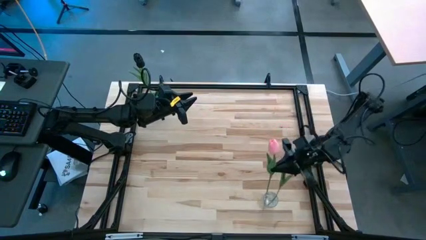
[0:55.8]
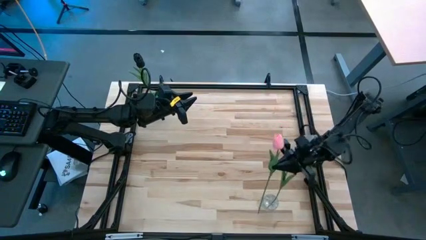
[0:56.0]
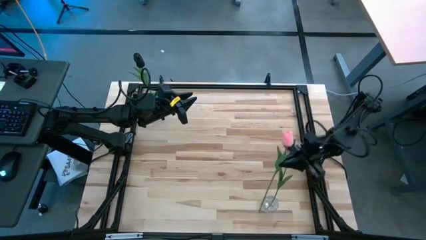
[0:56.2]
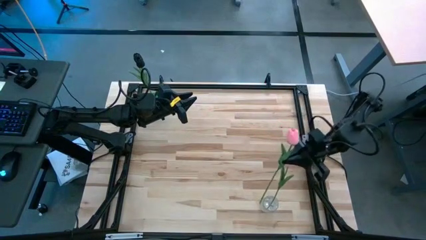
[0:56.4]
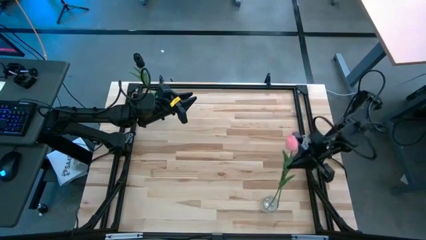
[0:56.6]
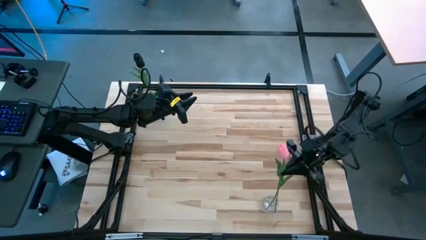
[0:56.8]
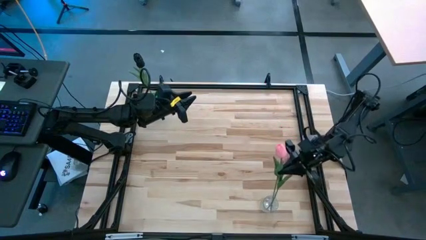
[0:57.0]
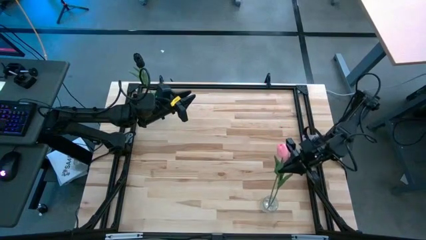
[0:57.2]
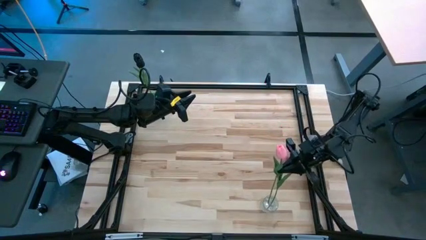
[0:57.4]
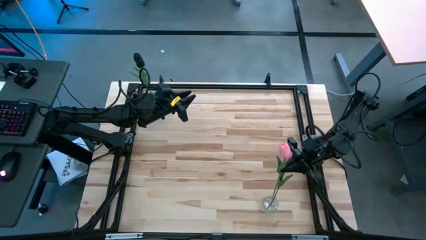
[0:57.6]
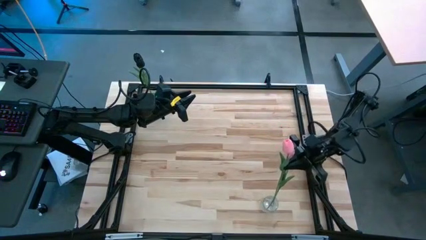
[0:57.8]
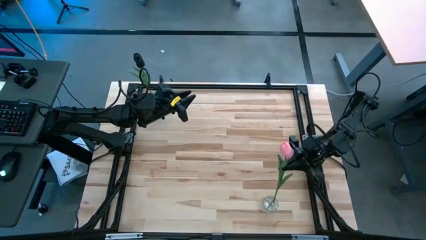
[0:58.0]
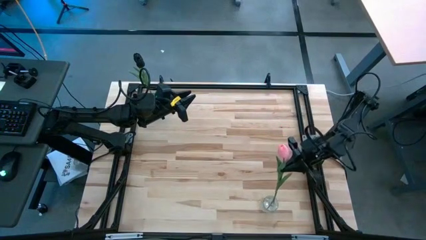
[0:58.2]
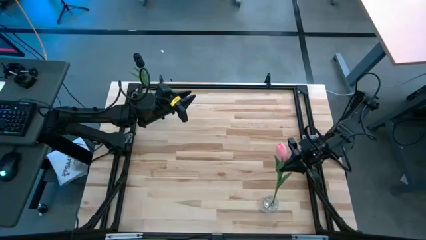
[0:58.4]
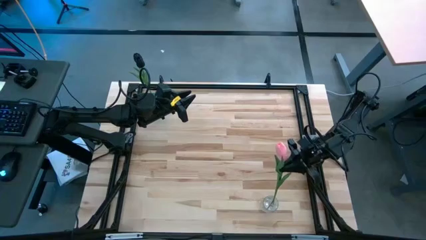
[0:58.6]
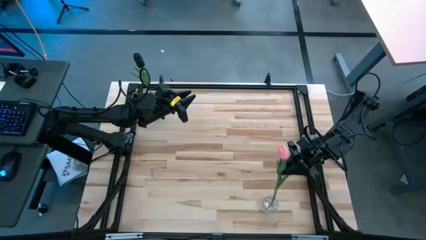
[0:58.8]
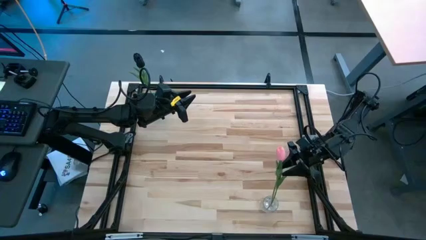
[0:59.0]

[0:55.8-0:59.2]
Task: Sort flowers into vase by color
Put the pink flower into the transparent vase

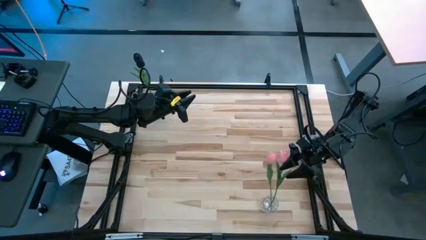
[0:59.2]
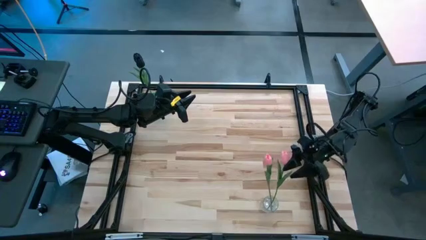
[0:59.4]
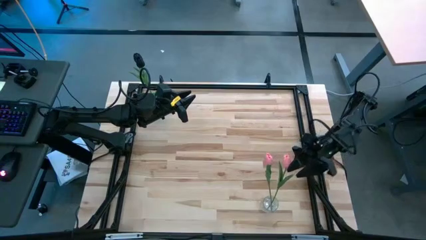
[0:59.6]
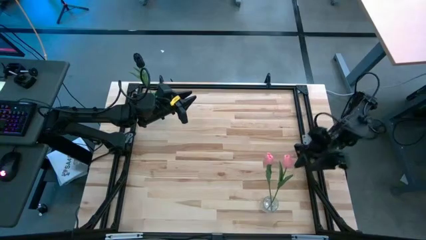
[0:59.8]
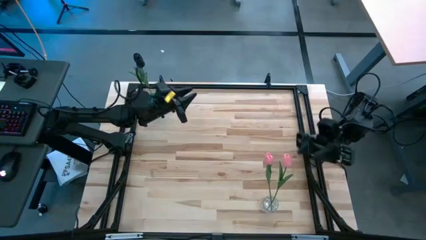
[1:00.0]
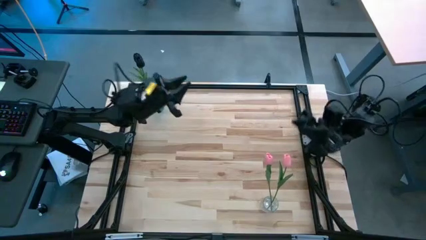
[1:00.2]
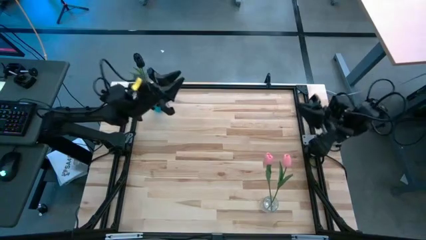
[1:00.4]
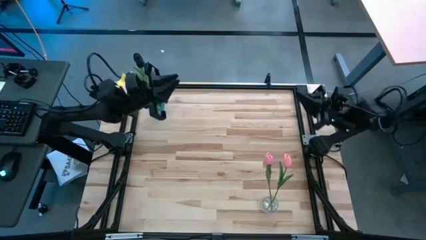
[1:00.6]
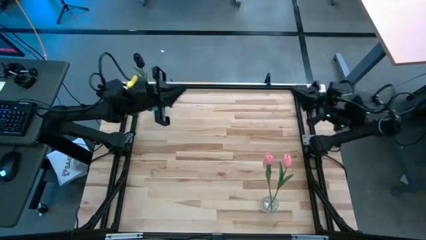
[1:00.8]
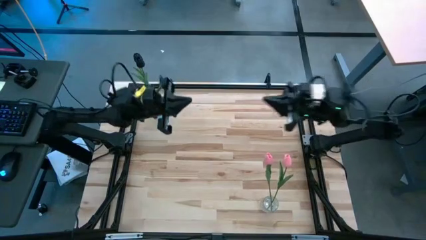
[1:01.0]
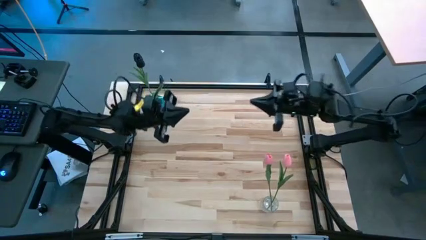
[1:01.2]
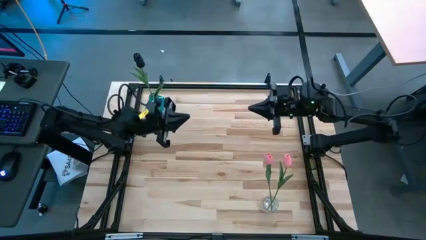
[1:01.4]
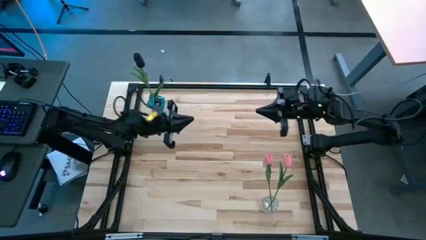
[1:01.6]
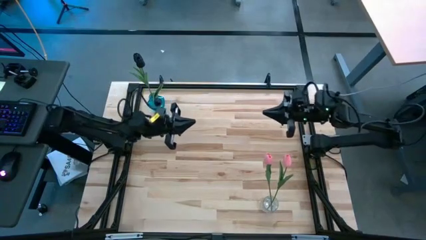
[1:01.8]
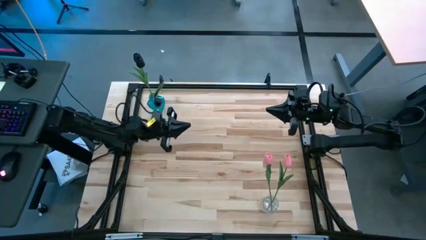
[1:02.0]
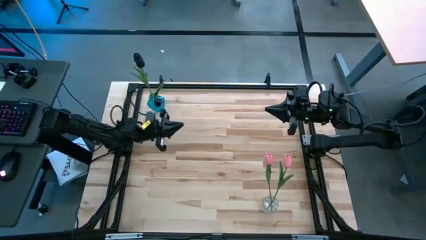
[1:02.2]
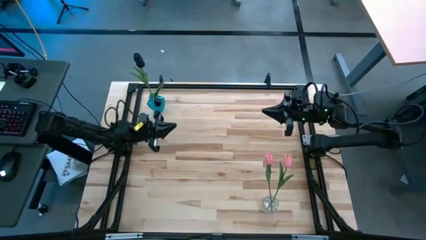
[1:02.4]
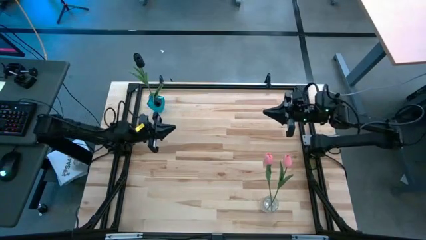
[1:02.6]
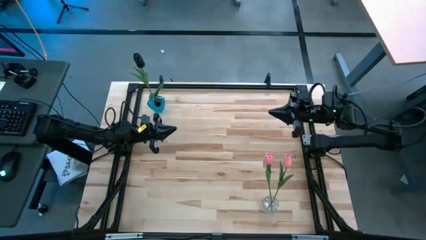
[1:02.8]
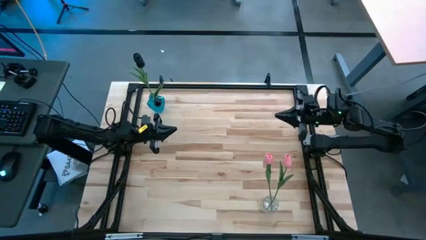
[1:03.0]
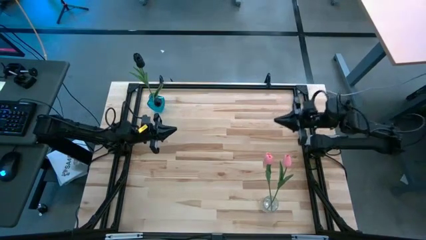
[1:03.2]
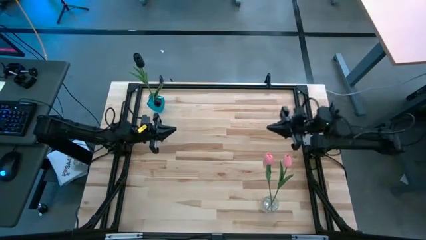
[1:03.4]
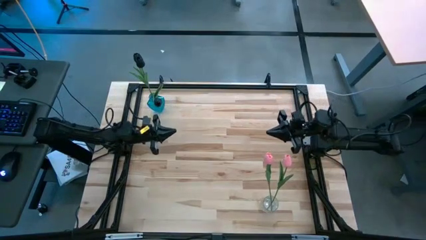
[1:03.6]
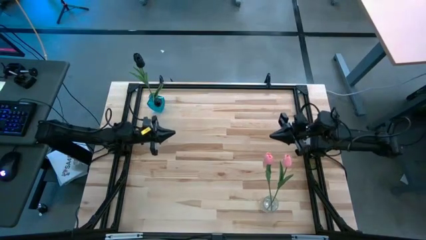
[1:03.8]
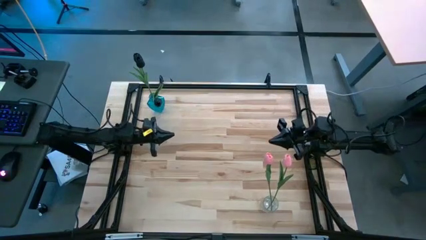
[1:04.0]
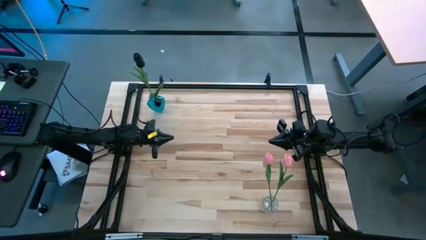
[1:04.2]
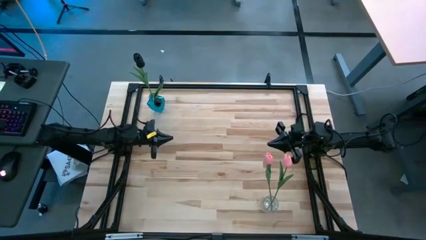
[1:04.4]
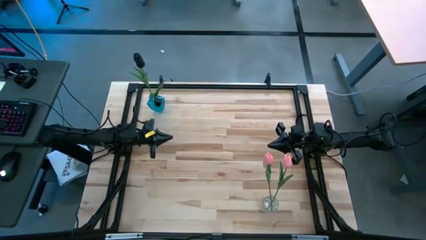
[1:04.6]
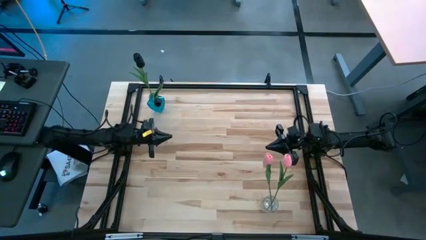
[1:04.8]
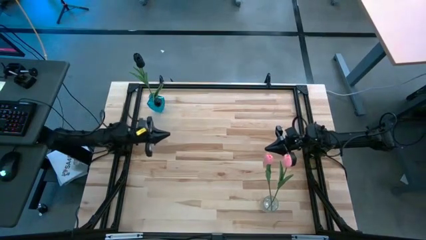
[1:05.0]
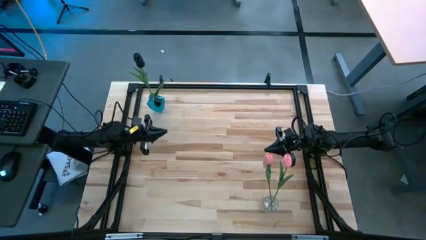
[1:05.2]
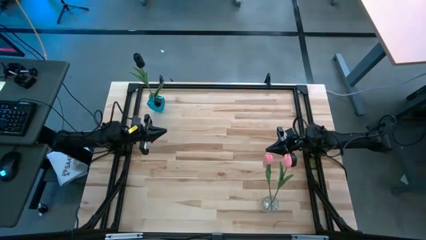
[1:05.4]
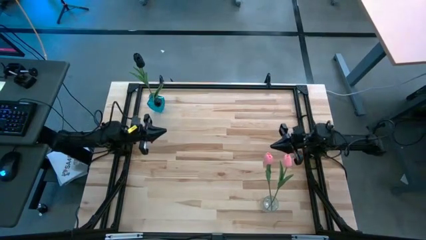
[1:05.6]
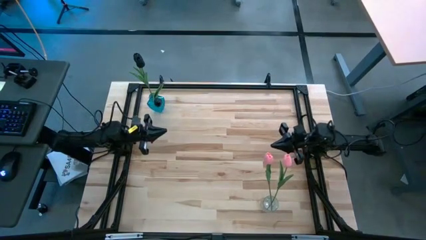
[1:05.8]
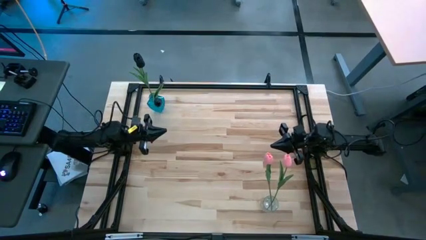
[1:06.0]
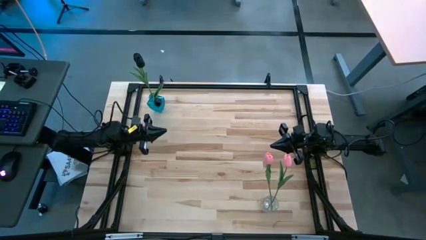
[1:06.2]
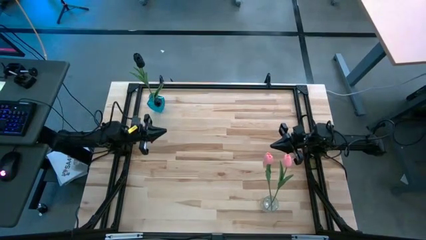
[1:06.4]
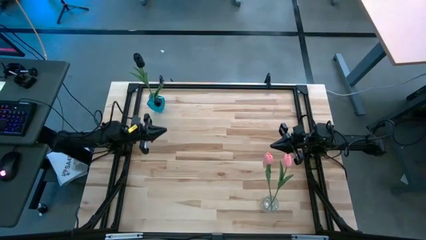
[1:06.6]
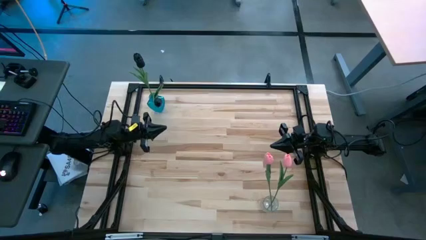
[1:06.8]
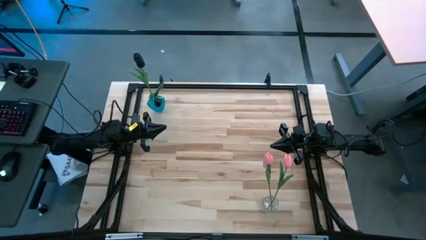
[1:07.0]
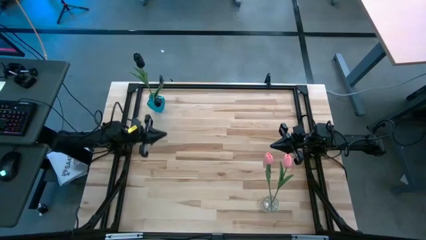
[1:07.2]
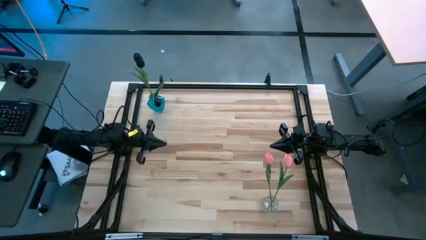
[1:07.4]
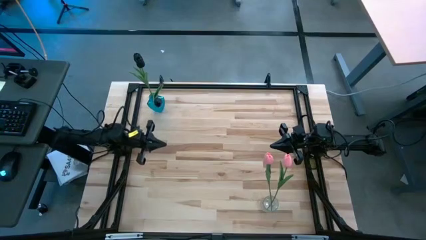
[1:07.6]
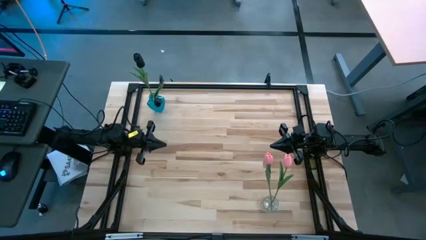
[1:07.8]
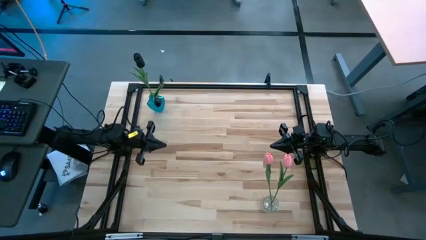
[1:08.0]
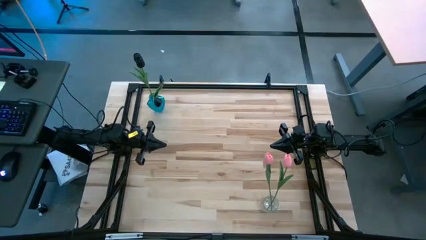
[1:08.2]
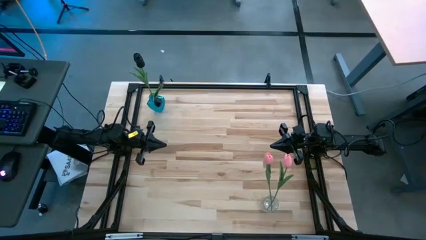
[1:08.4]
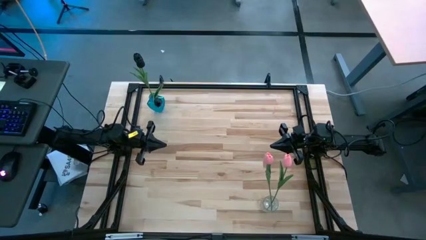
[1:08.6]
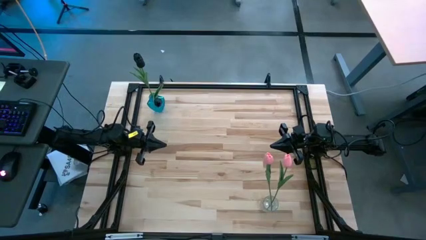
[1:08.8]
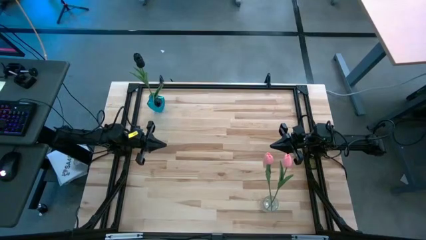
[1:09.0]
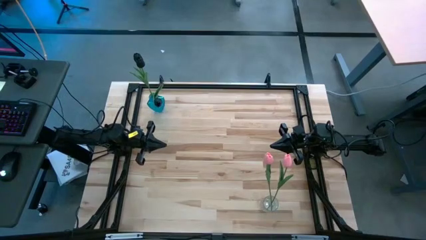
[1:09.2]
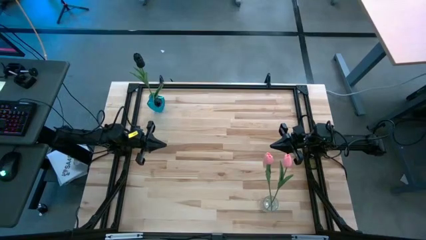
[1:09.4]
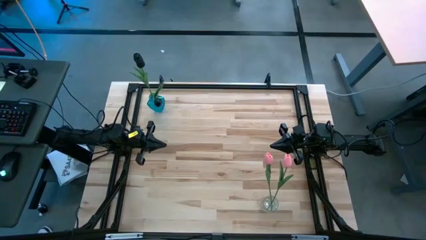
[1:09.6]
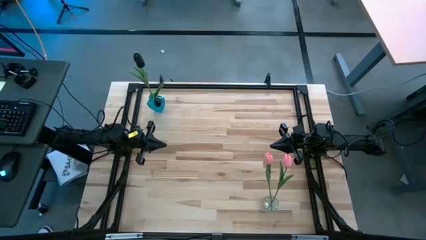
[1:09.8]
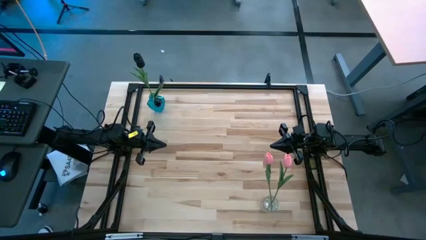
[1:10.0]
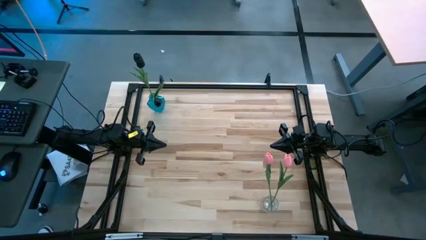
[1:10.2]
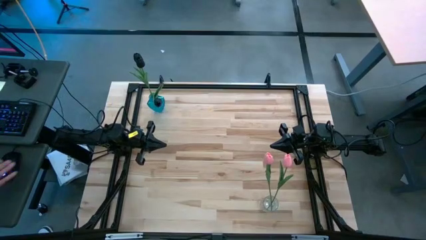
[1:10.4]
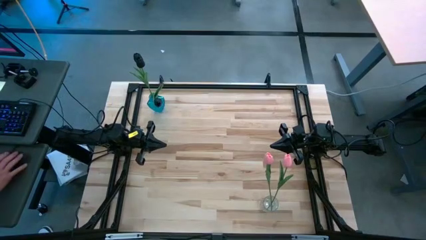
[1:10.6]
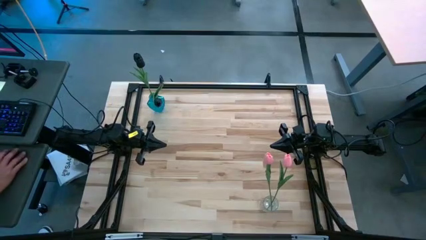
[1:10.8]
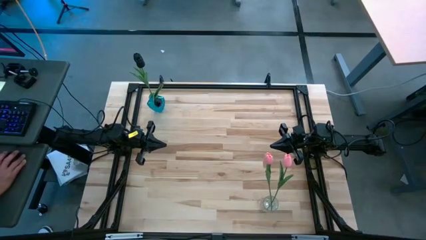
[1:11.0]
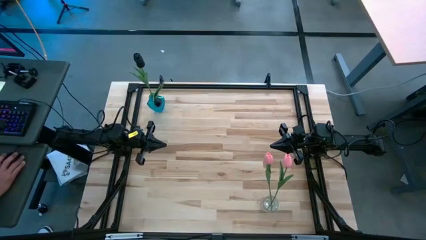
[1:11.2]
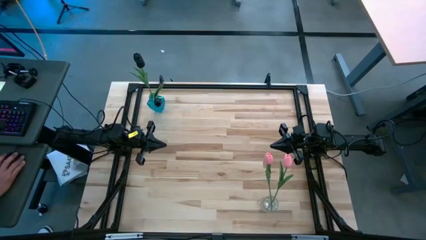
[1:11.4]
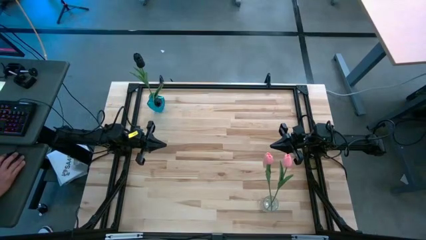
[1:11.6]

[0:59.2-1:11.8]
Return to Home Position
